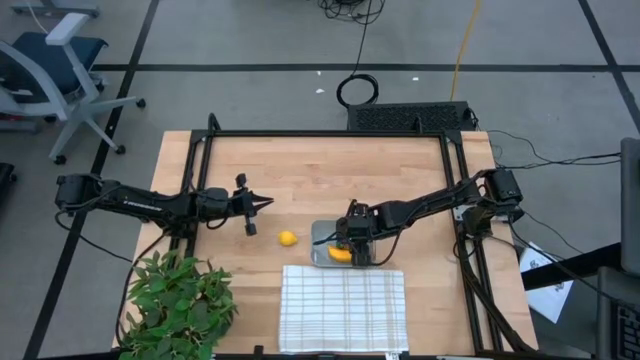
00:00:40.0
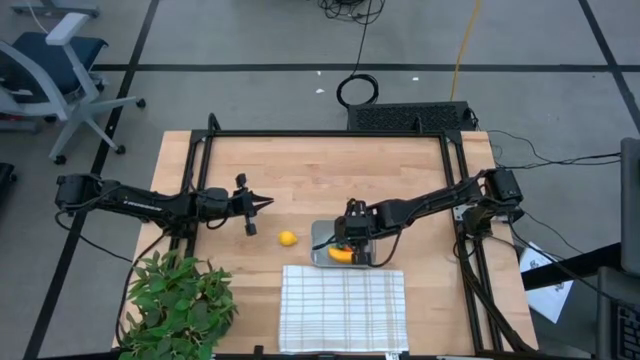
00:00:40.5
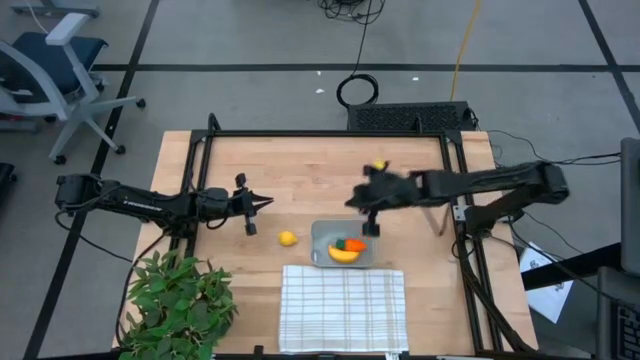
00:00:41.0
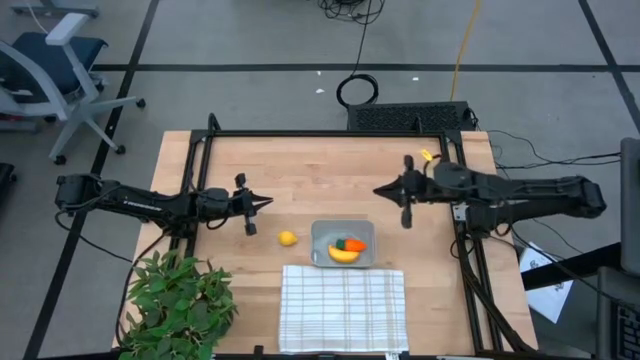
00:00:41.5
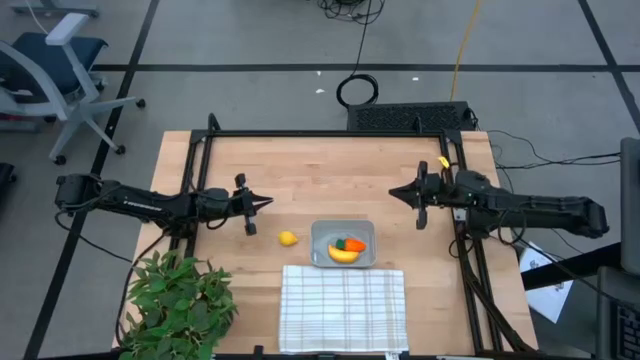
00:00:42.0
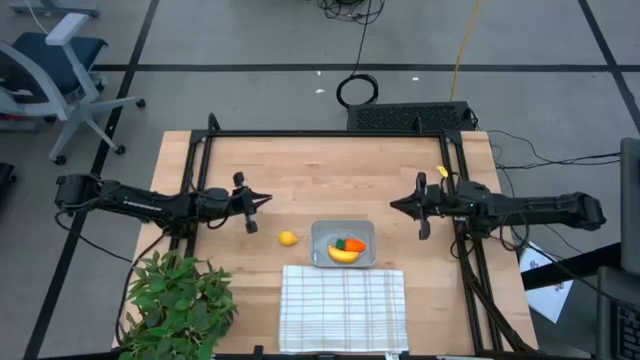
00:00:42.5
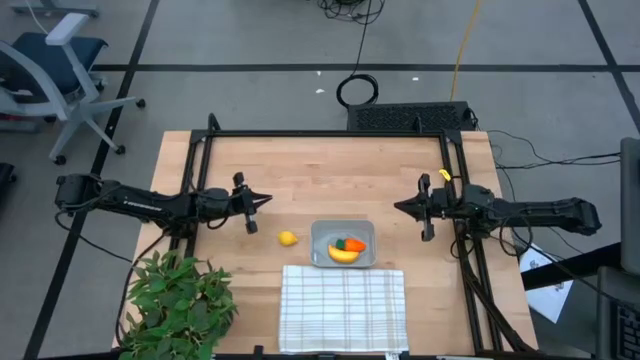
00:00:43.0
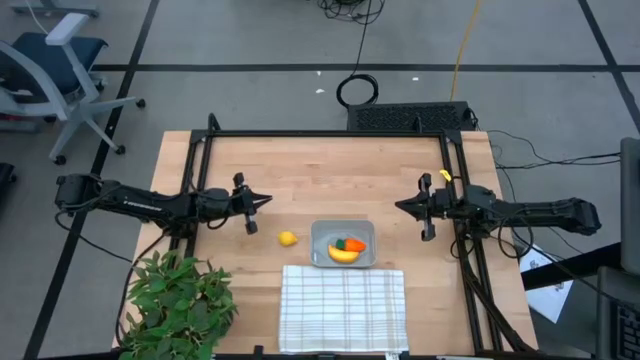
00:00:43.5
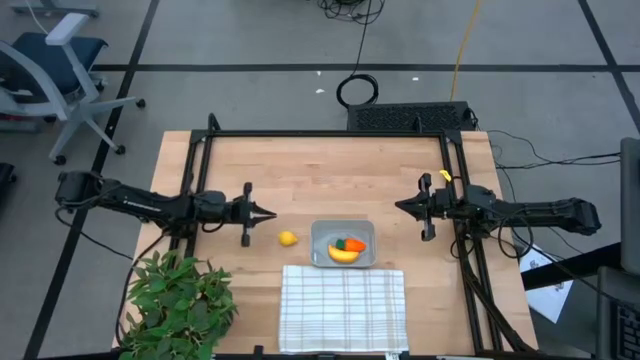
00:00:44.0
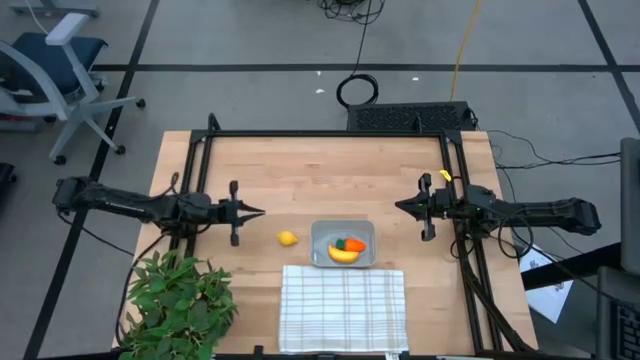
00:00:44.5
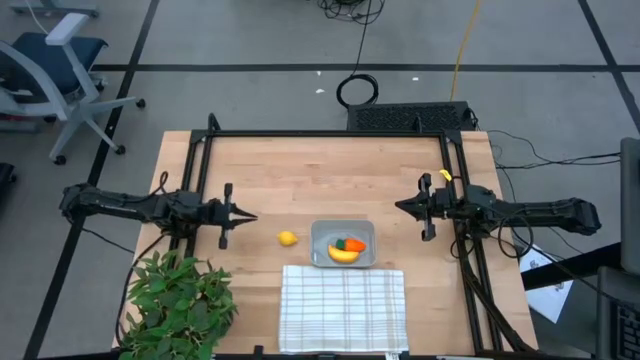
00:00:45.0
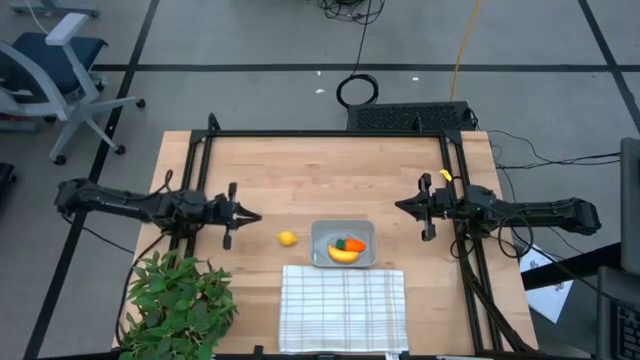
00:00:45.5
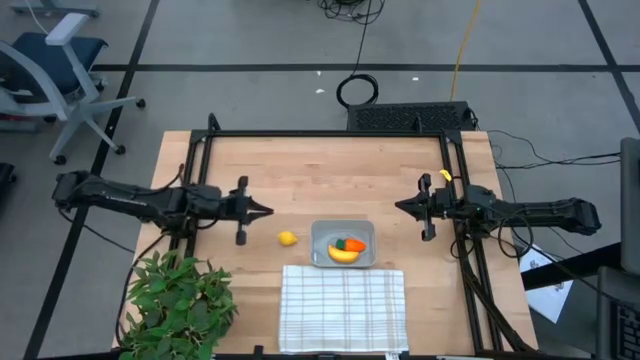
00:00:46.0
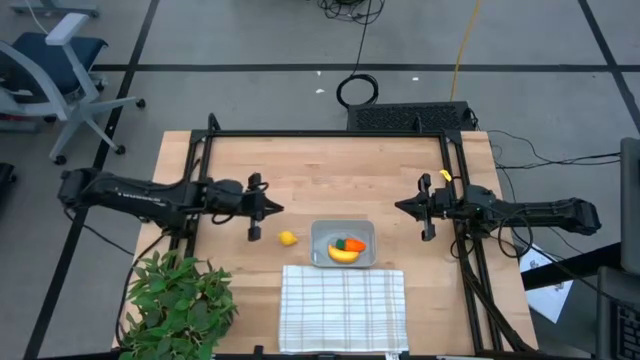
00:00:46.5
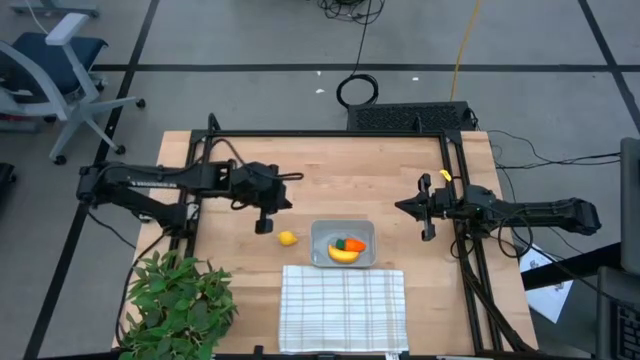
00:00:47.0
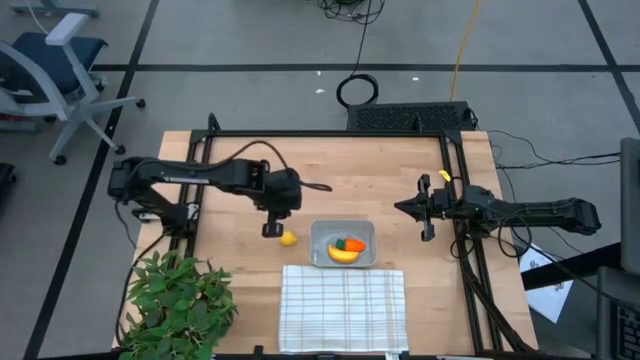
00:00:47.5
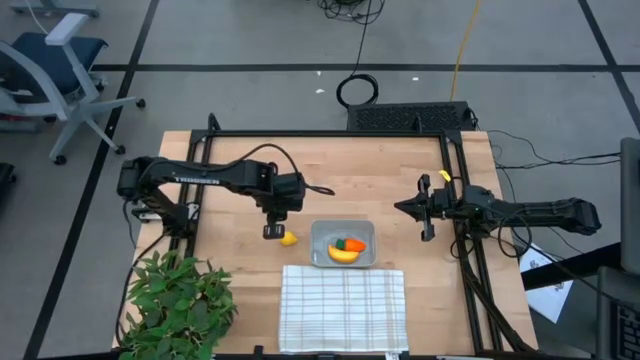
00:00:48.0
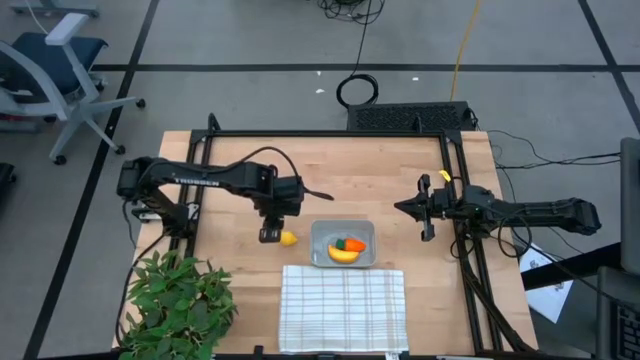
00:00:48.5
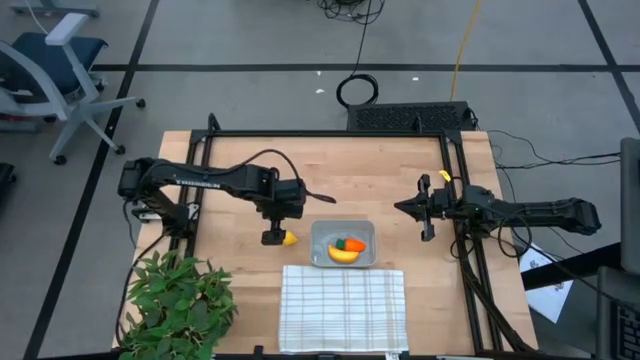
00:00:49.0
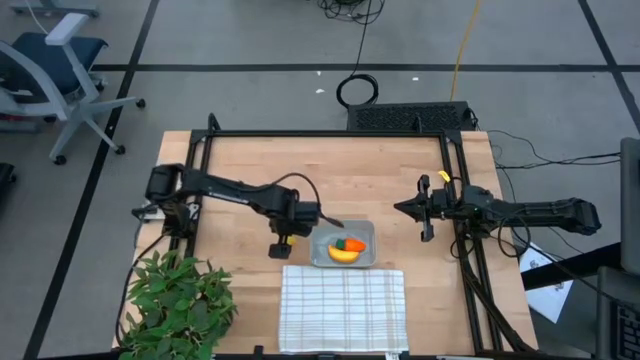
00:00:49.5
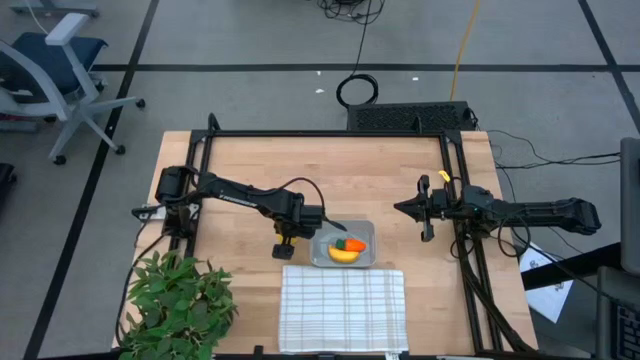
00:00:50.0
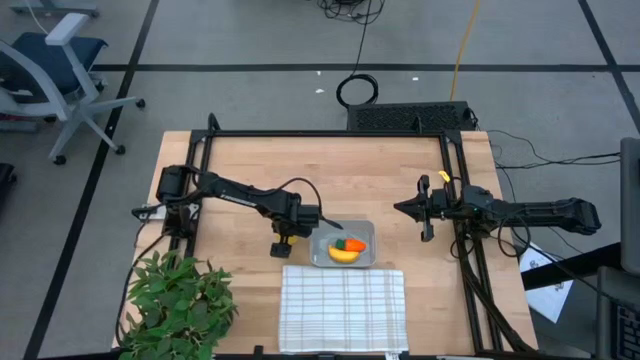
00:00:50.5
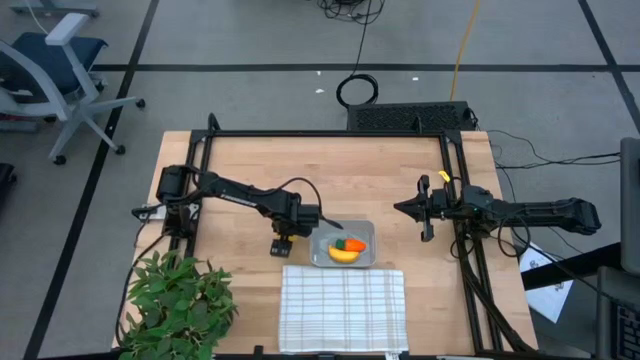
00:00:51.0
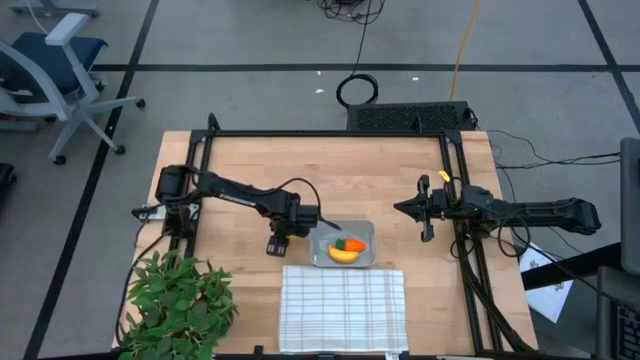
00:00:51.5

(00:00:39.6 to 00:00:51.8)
Task: Pick and placing Produce into tupperware
Put the yellow lemon into the gray bin

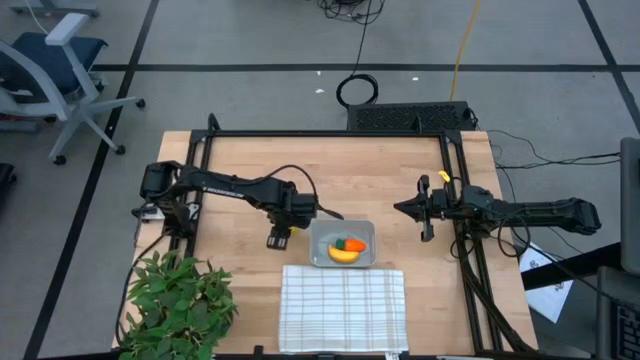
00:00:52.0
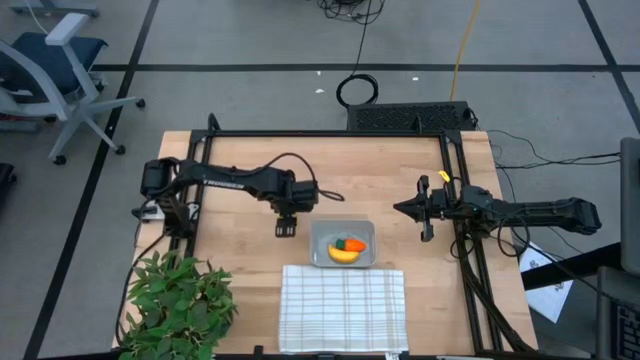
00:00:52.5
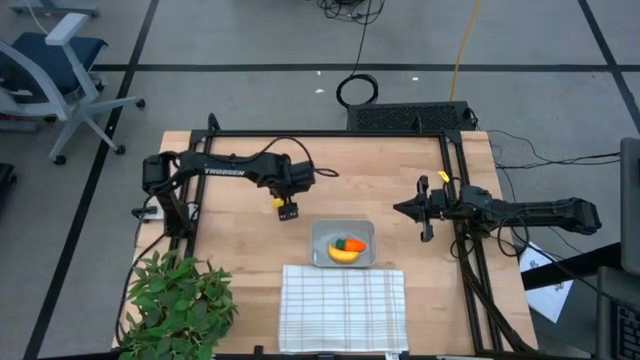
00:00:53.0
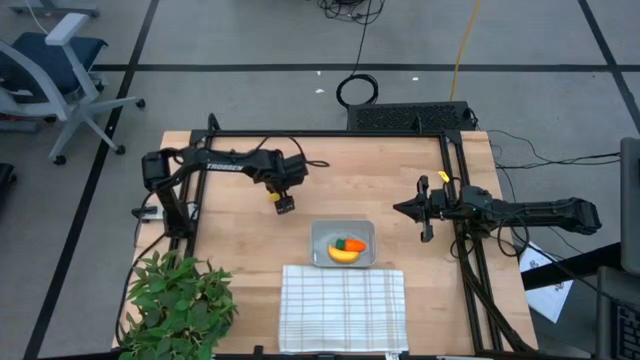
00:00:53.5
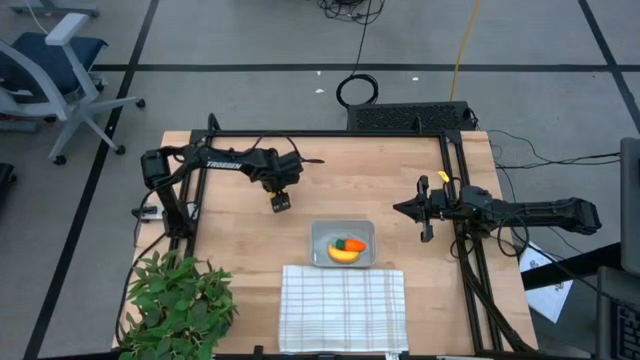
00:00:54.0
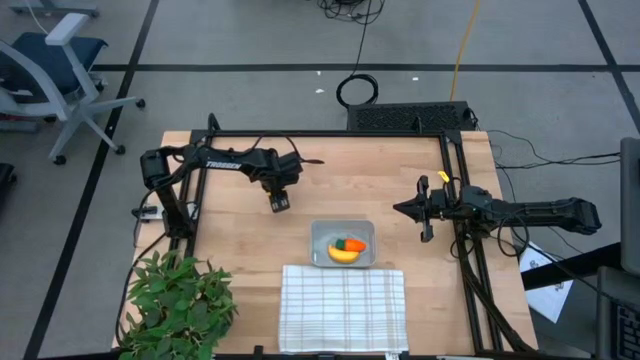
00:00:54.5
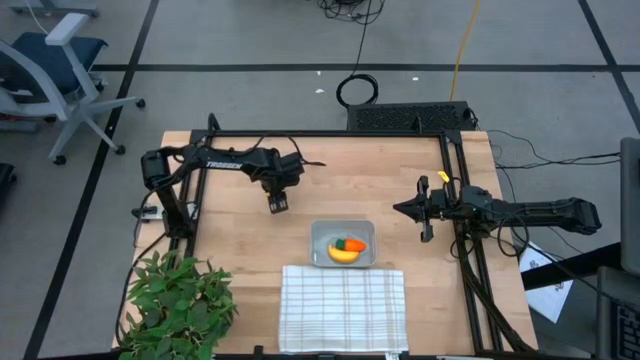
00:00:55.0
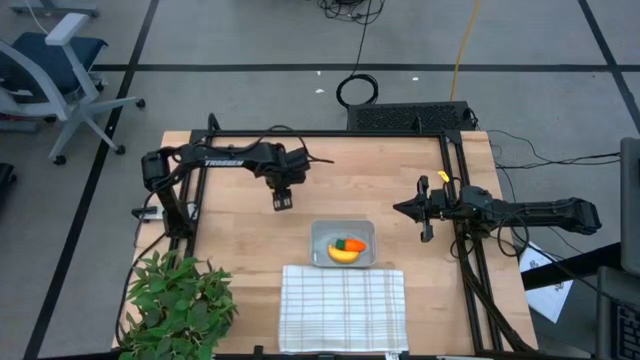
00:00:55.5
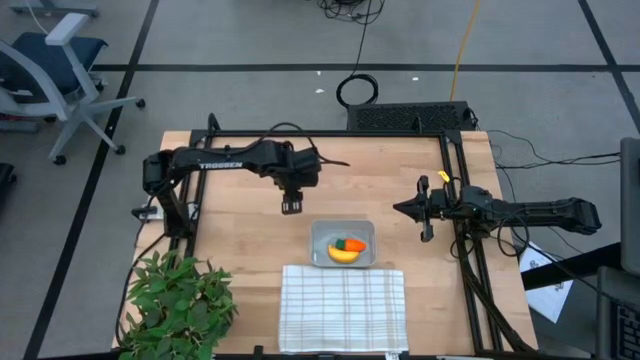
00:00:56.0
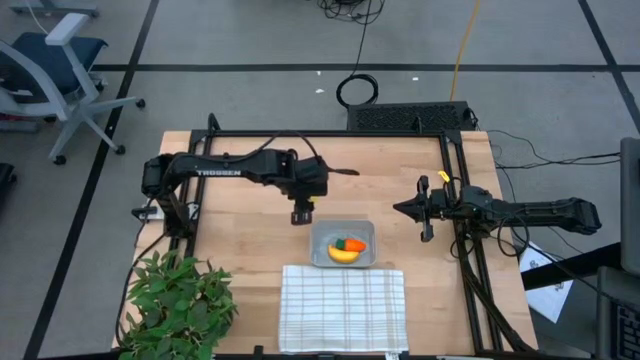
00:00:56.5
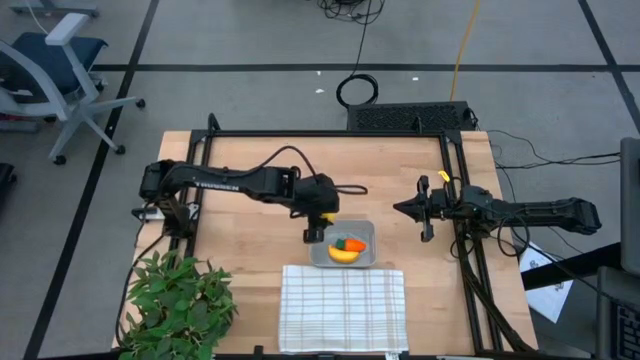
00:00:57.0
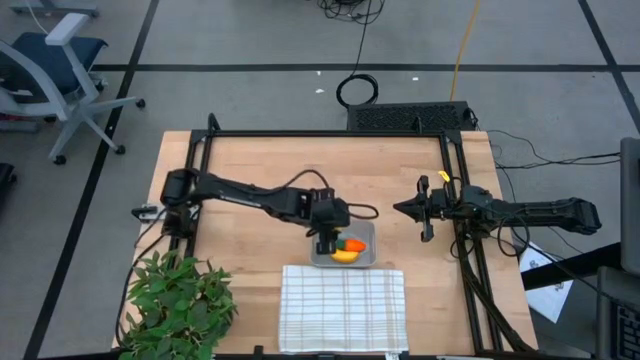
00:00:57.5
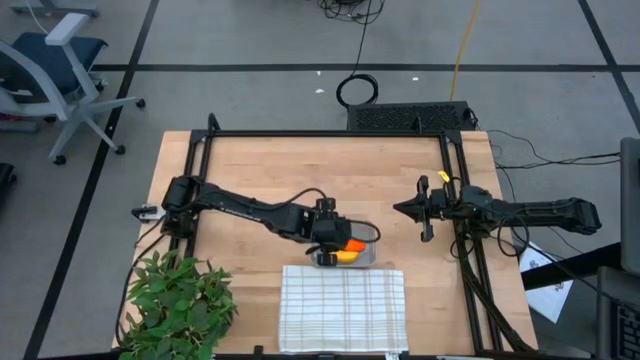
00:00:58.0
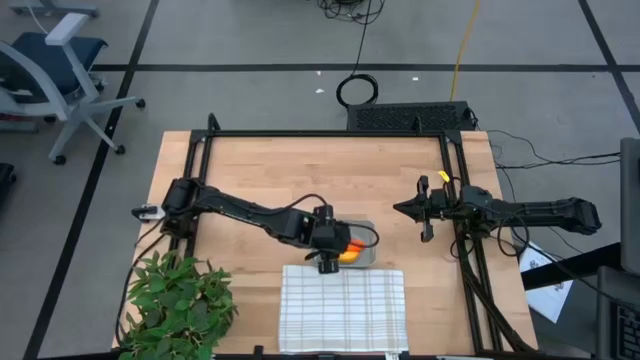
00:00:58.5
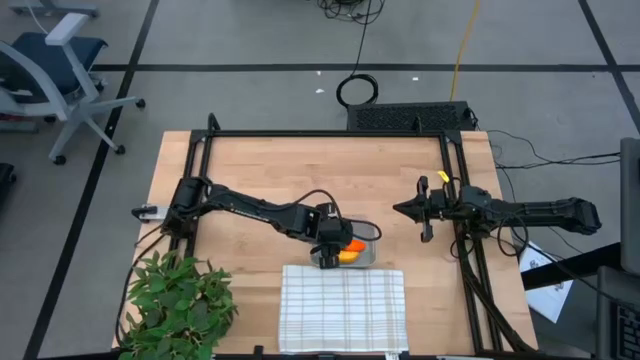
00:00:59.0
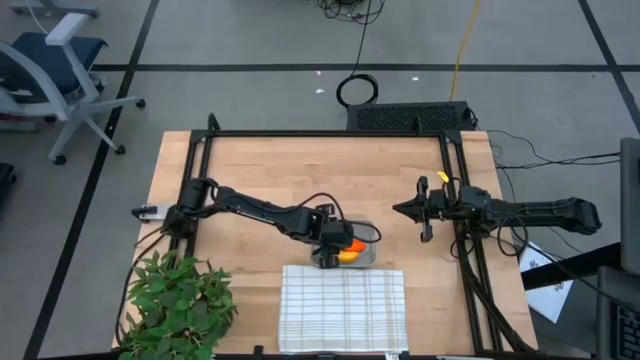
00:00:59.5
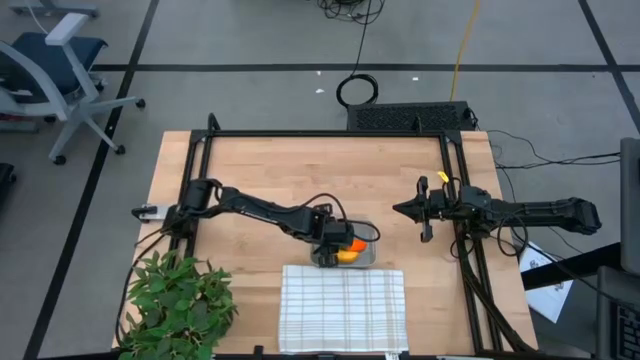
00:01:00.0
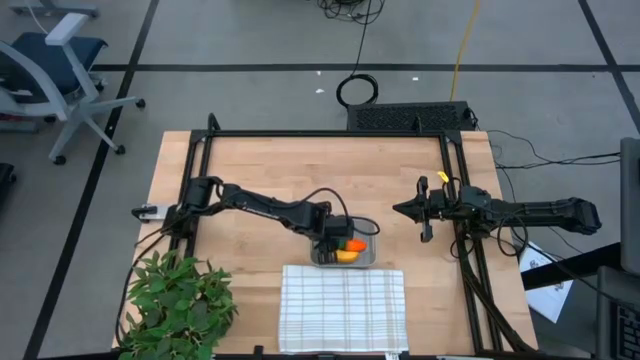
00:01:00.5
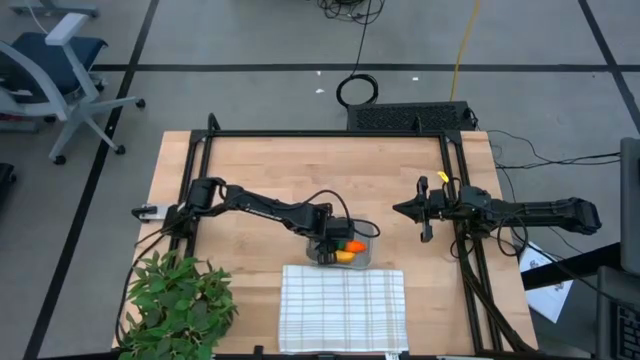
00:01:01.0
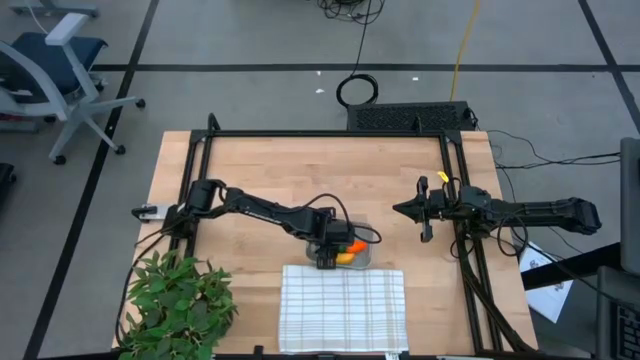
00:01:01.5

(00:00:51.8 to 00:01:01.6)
Put the lemon into the gray bin
